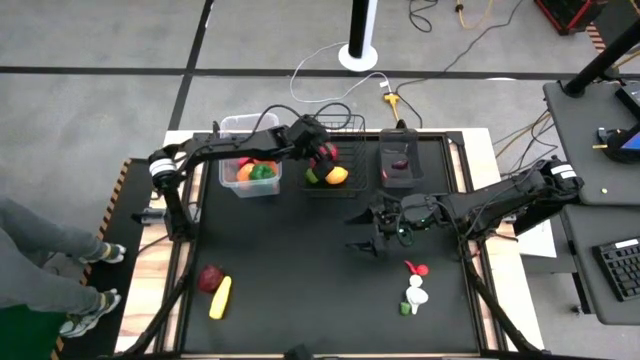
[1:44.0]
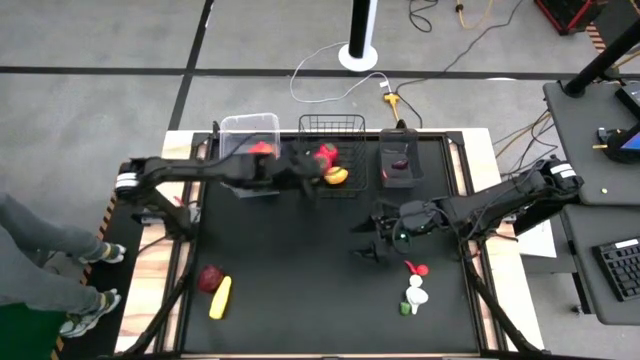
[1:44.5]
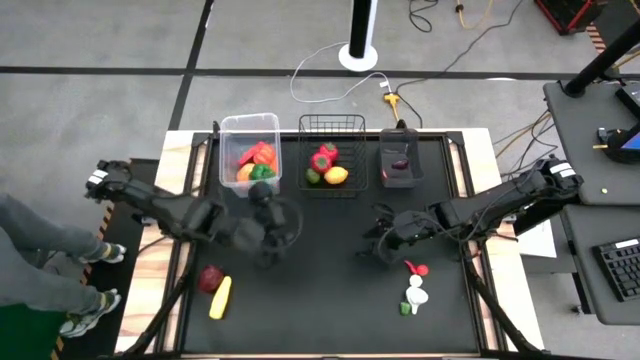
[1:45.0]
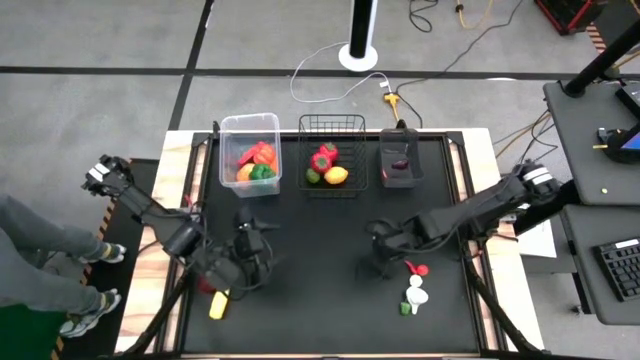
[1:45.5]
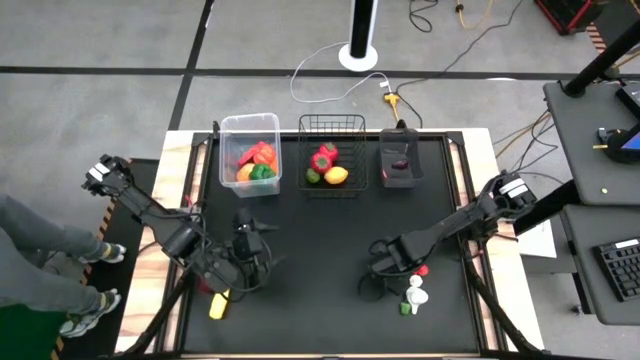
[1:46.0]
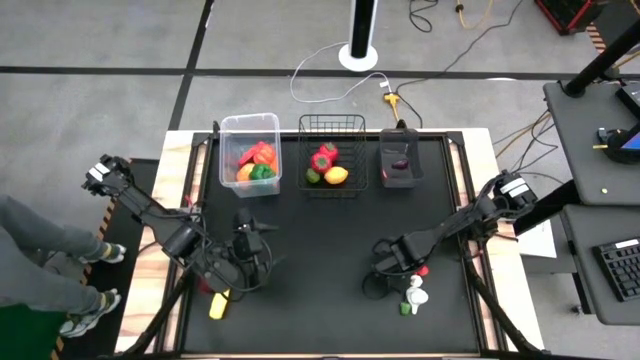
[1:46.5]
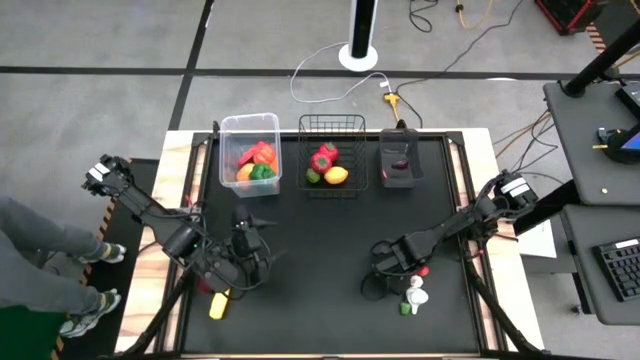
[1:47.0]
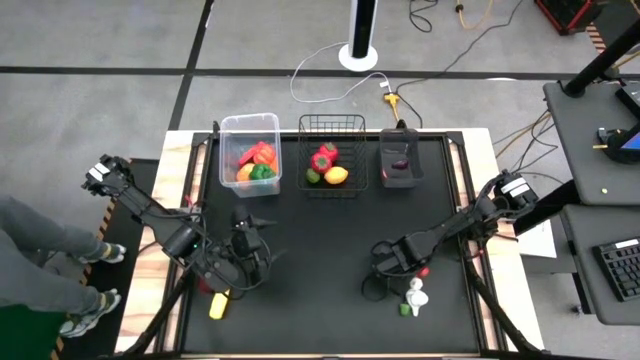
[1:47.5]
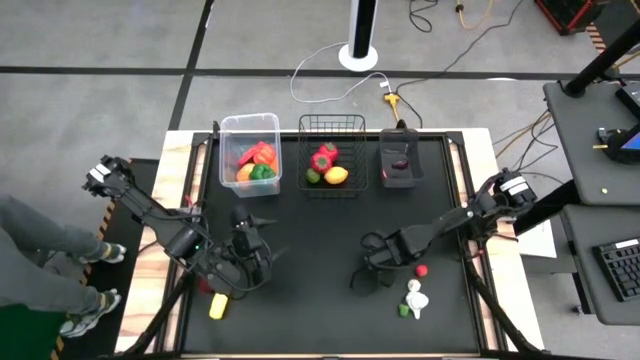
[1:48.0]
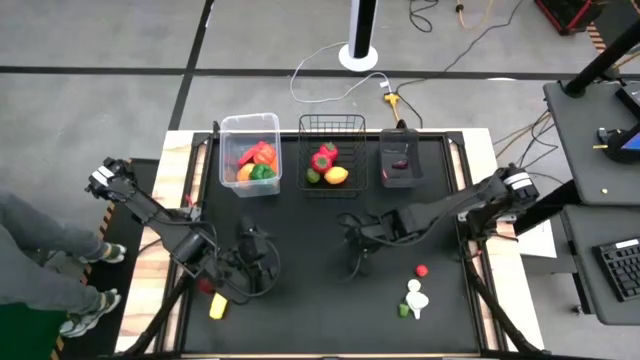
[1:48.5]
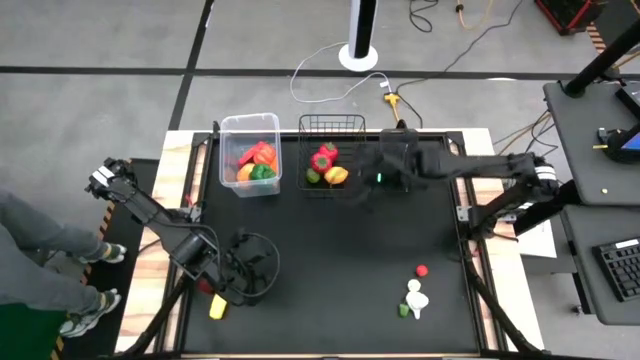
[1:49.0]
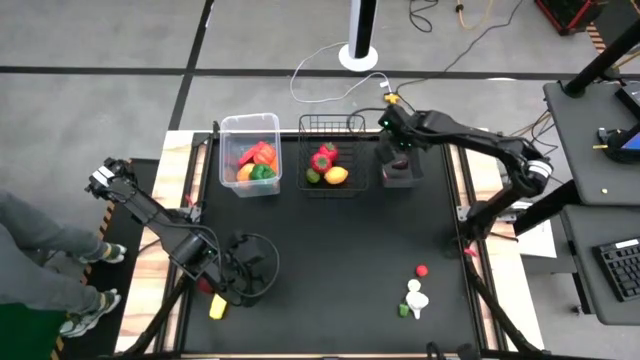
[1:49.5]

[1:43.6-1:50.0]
Task: Sort produce into baskets
Put the red chili pepper into the black basket

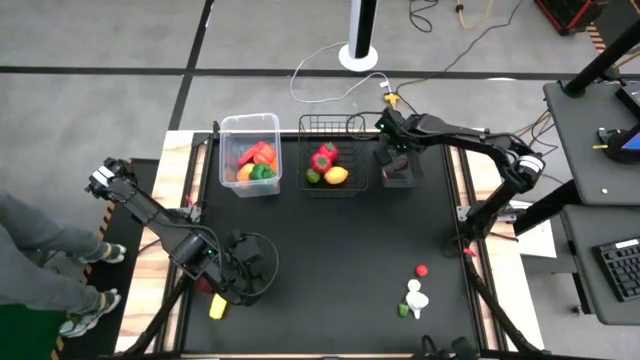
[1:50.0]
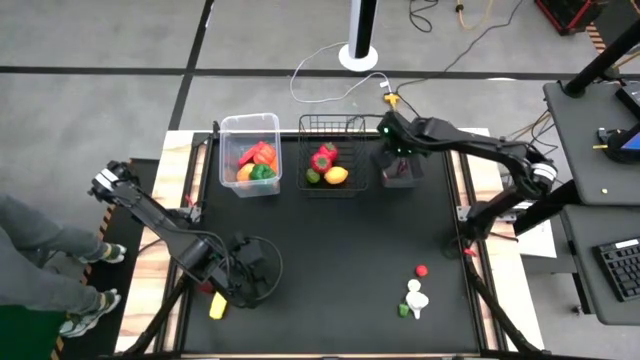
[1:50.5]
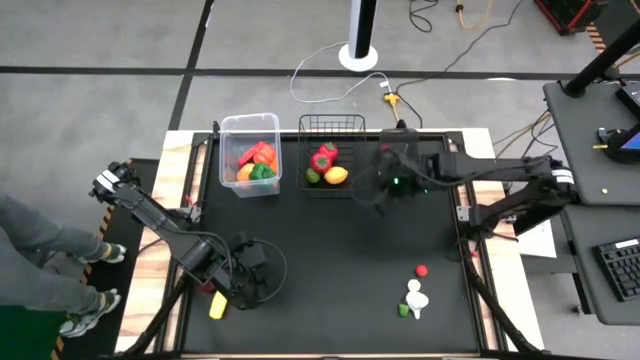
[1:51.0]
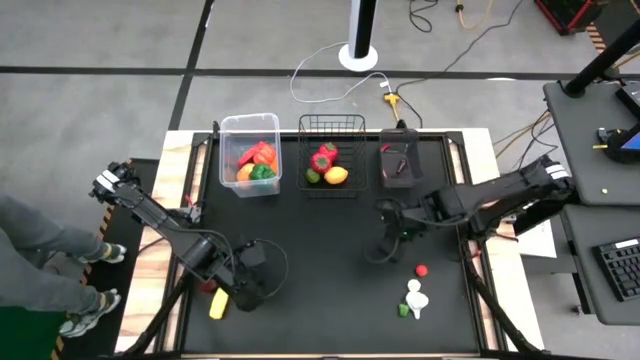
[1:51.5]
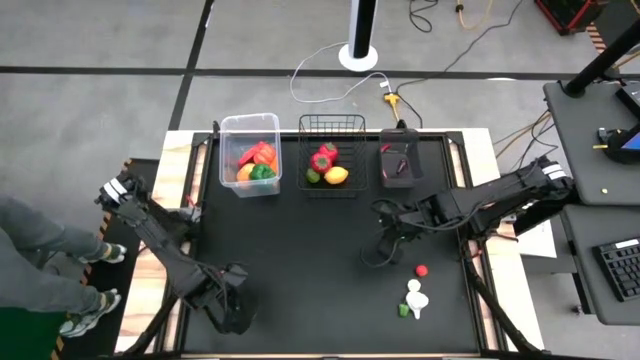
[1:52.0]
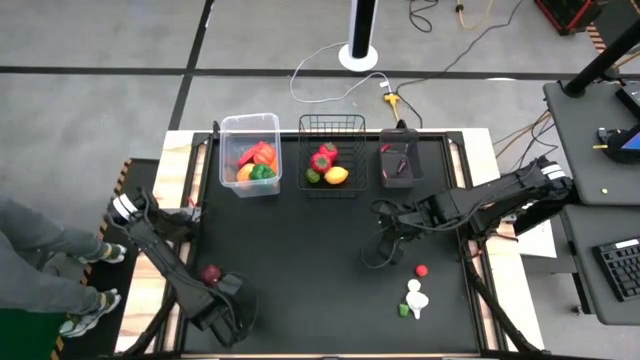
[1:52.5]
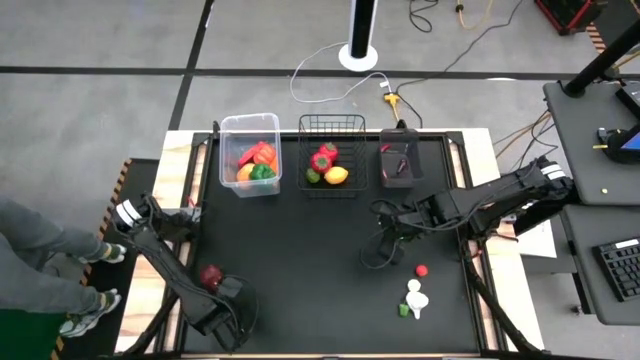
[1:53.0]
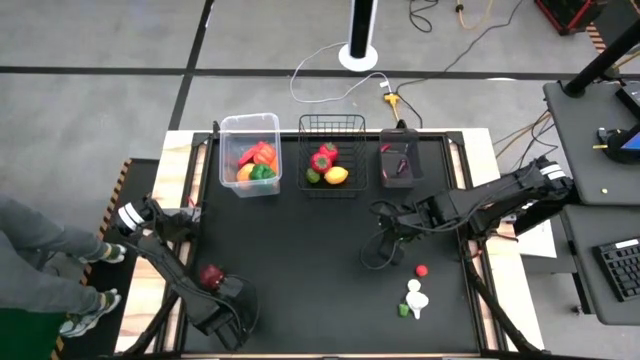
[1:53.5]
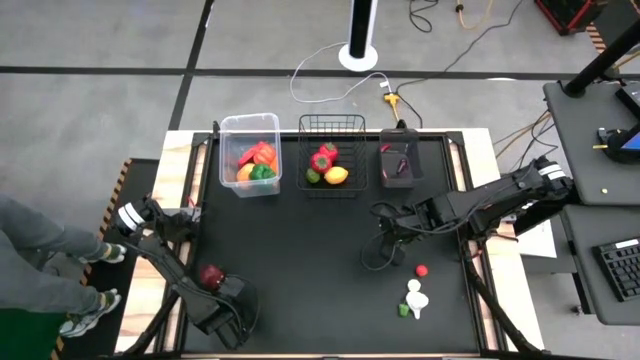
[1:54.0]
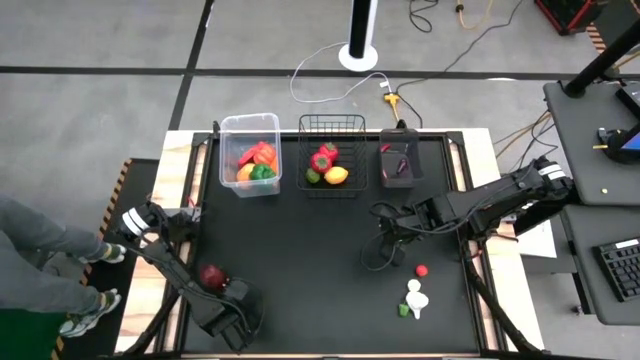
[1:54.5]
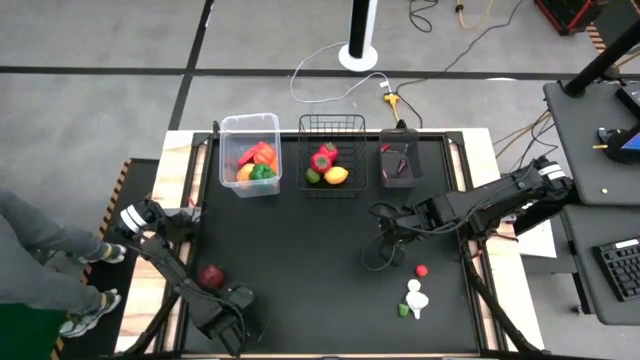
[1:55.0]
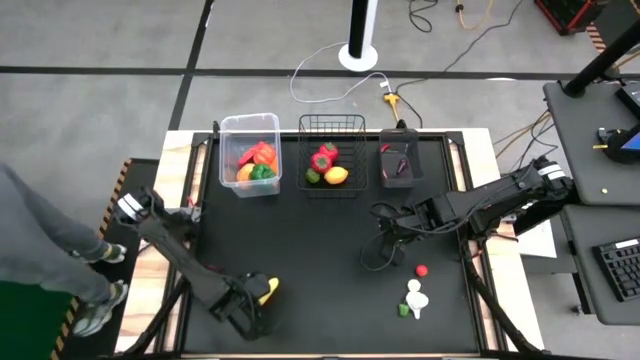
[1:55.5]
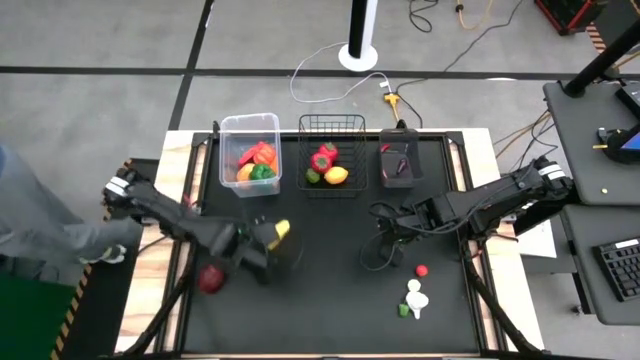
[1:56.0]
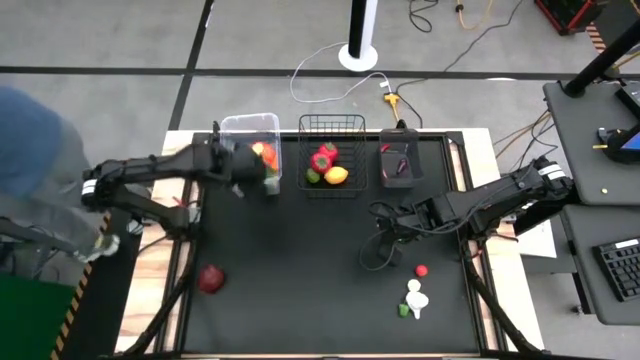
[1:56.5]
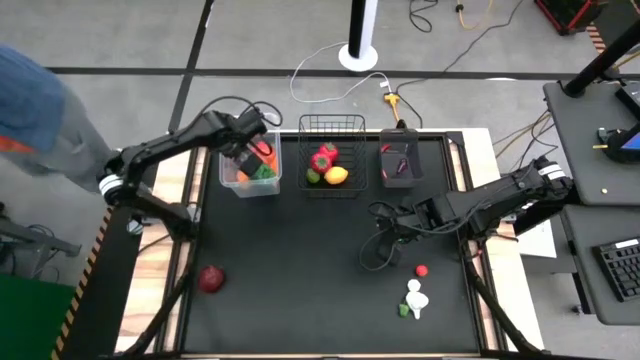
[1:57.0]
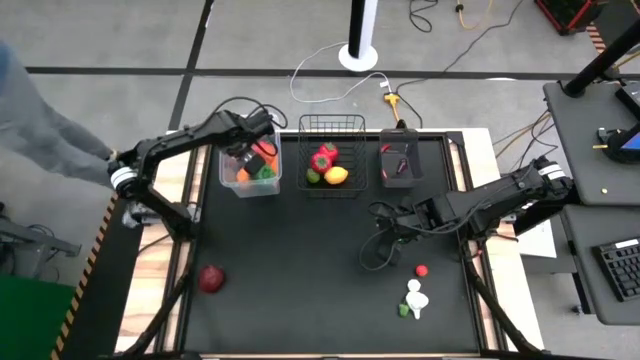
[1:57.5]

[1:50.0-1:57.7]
Put the corn into the transparent basket

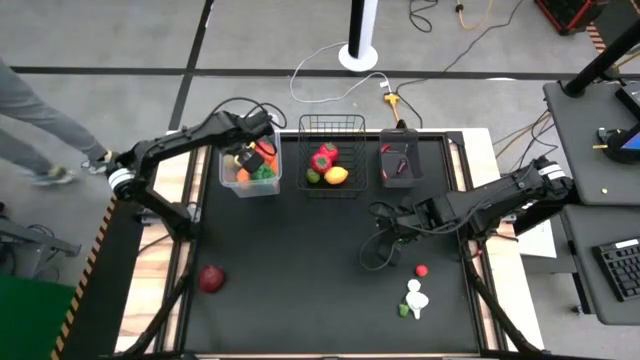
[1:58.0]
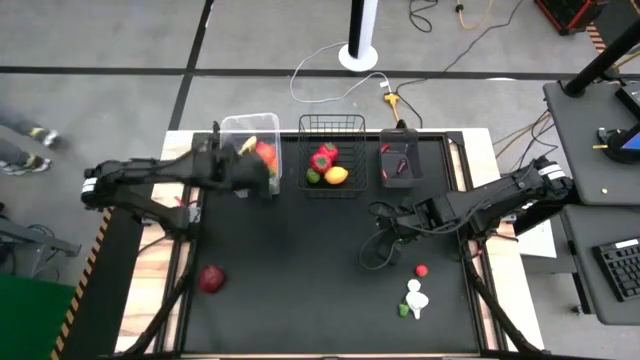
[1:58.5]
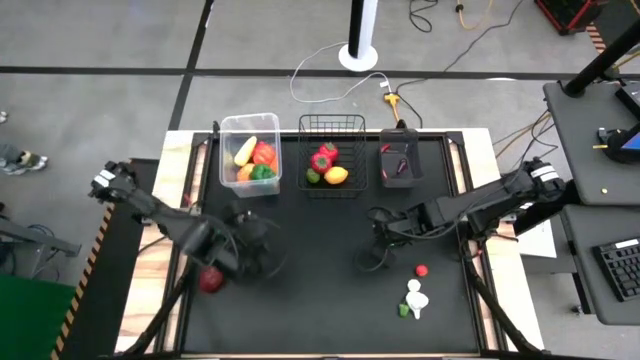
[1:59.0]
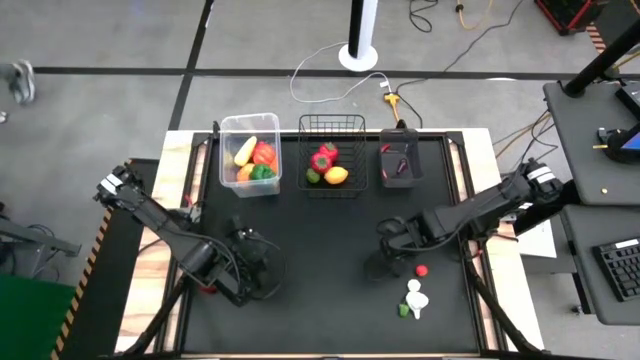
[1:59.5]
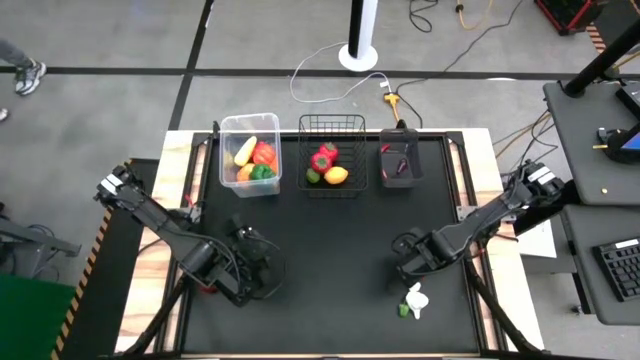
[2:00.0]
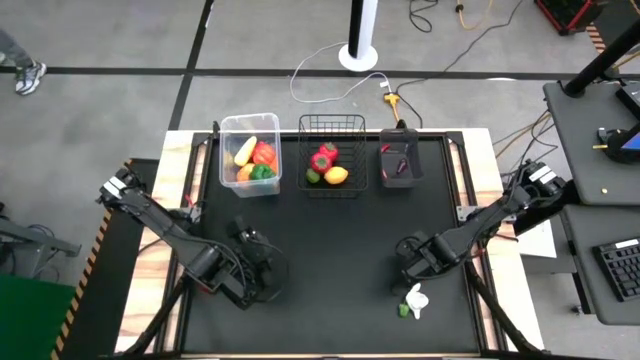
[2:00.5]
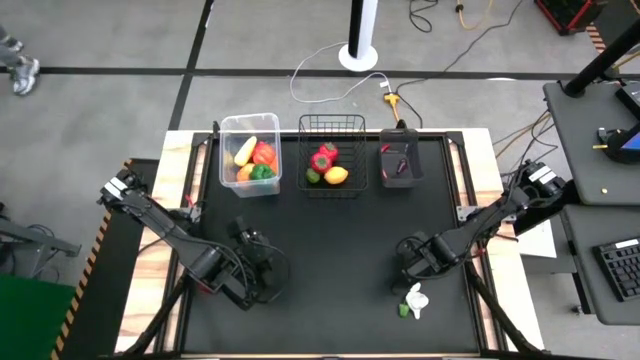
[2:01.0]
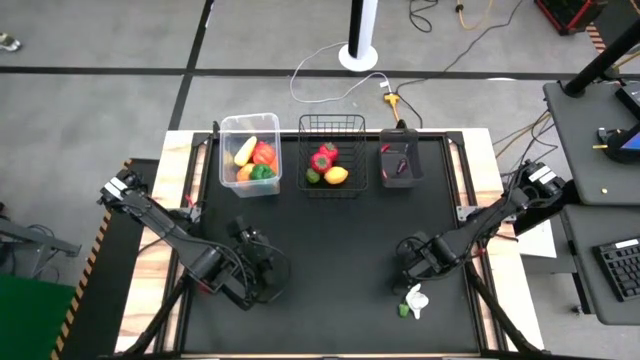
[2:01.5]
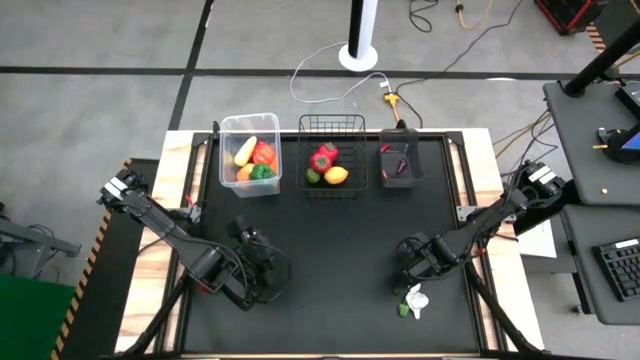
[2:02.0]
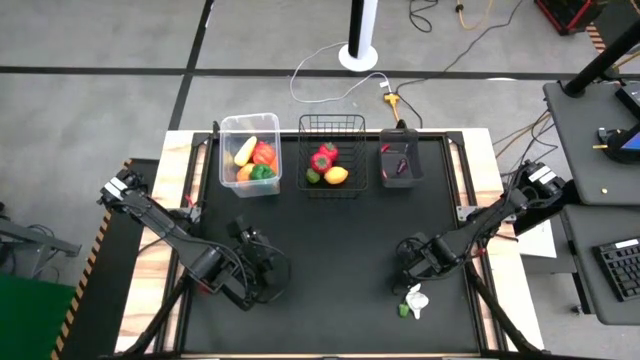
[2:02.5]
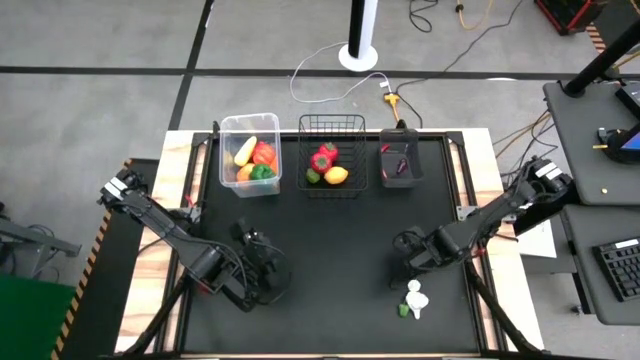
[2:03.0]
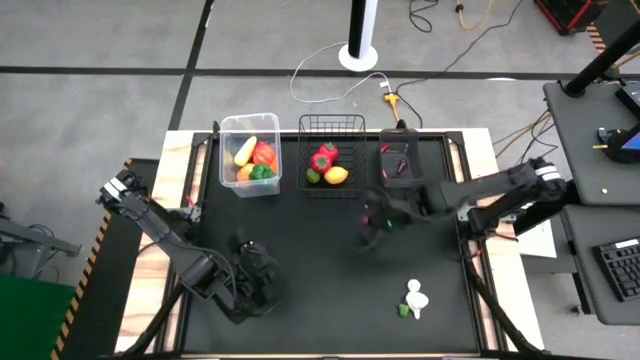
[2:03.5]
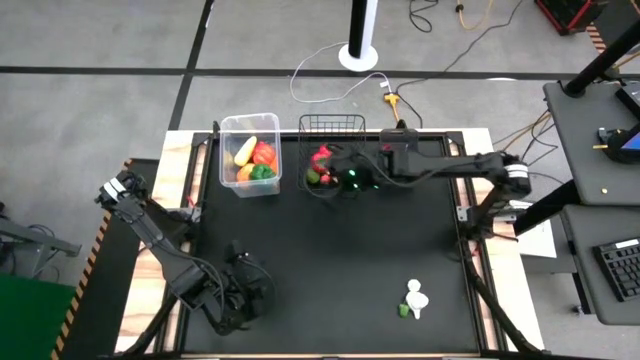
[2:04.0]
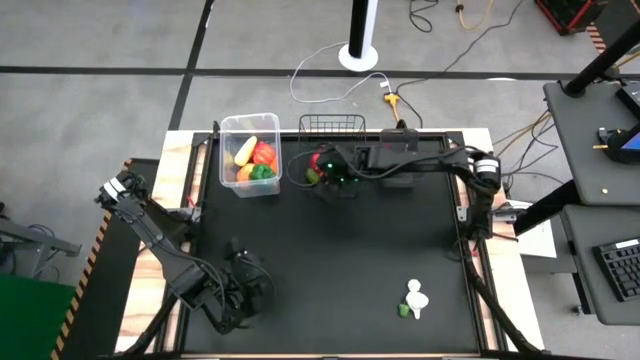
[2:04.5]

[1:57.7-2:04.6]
Put the small tomato into the wire basket
